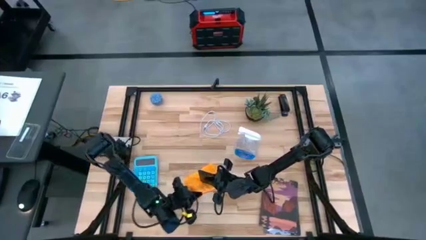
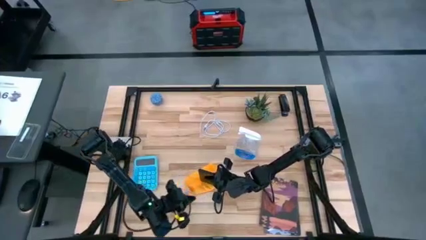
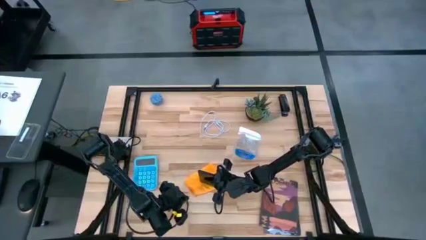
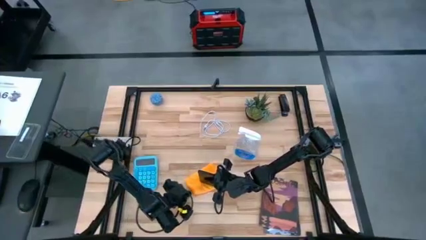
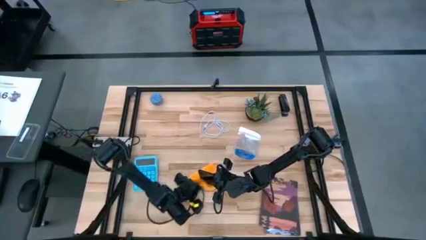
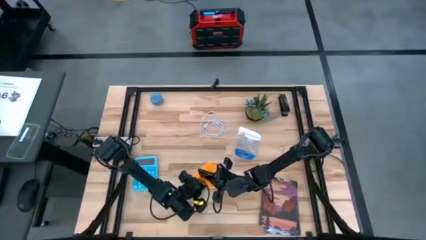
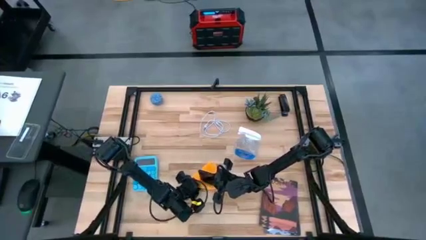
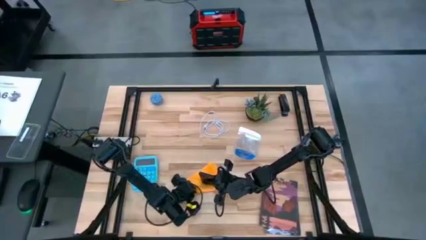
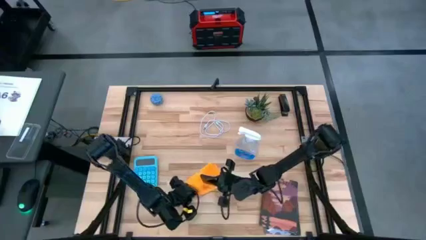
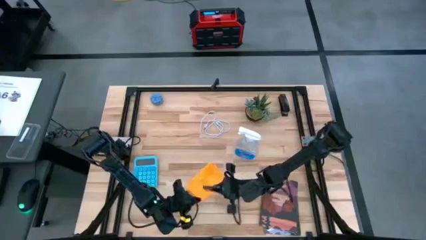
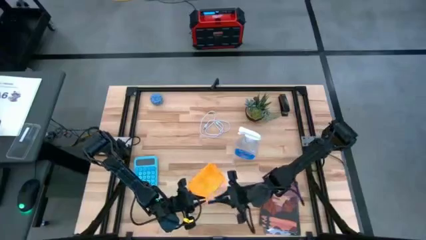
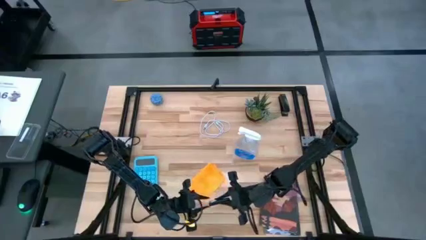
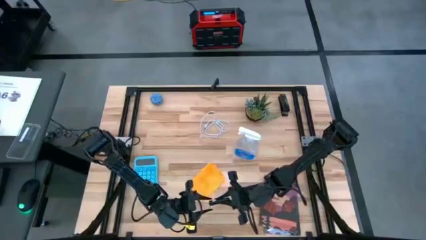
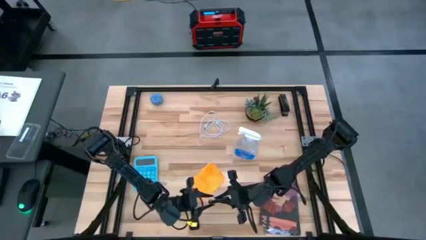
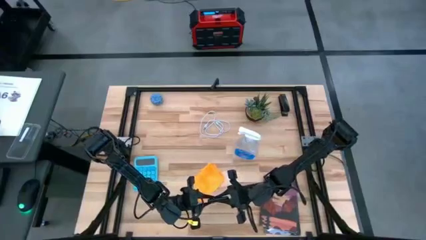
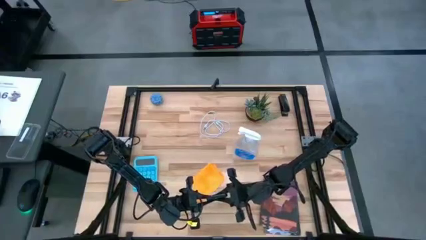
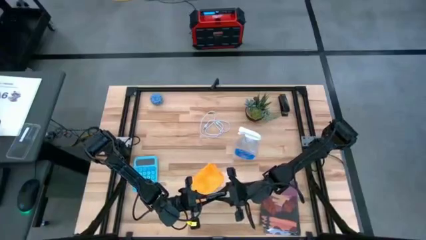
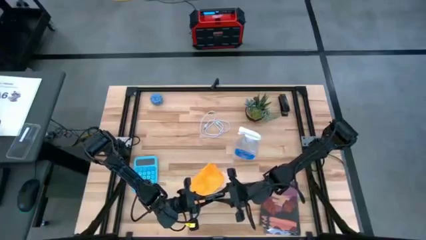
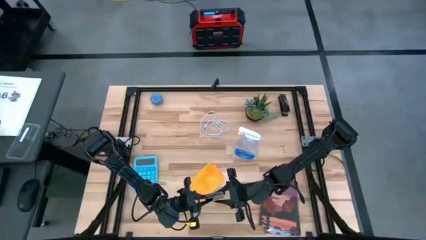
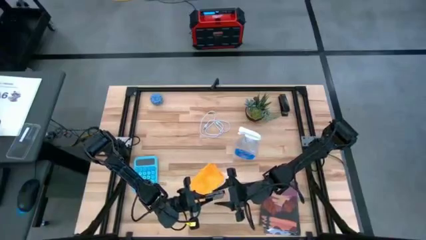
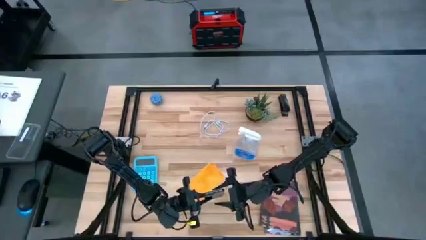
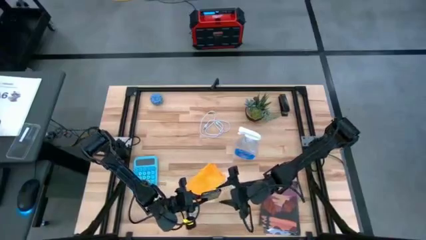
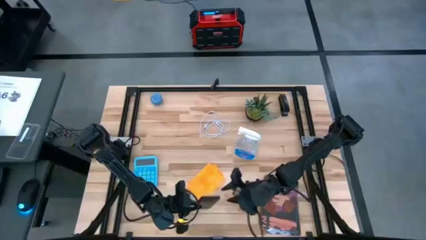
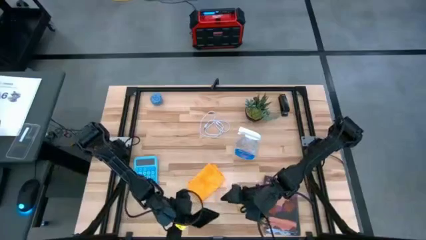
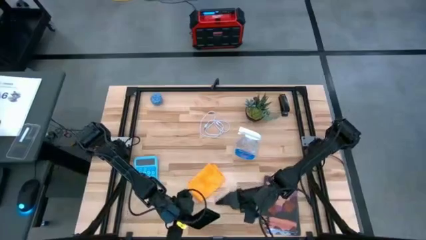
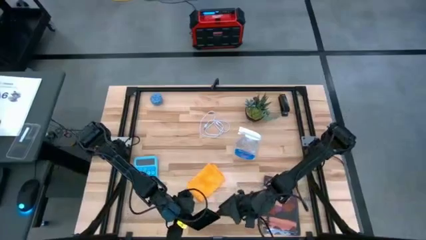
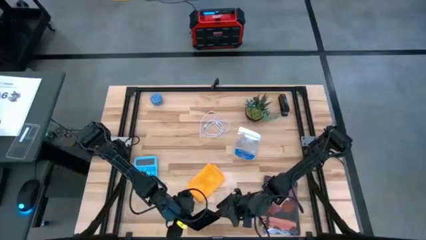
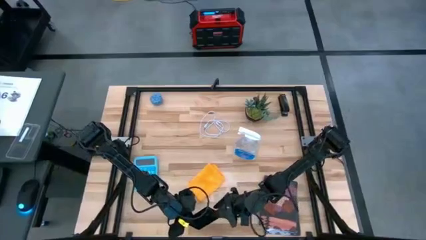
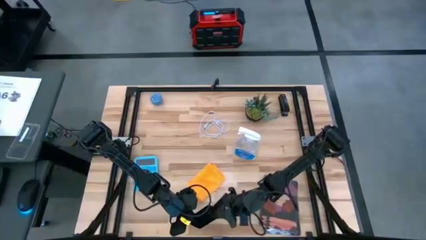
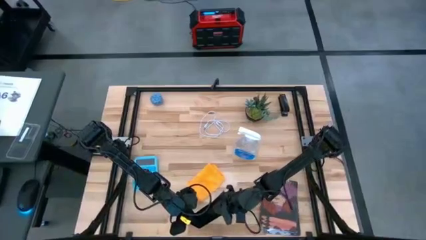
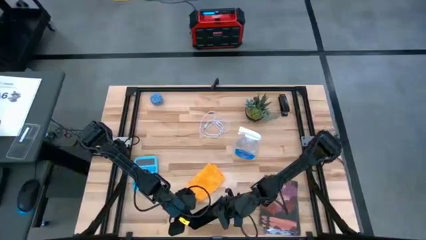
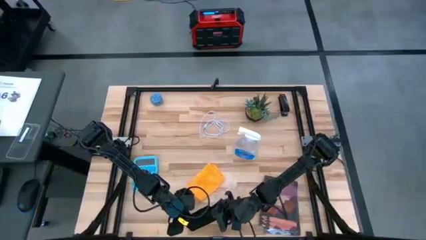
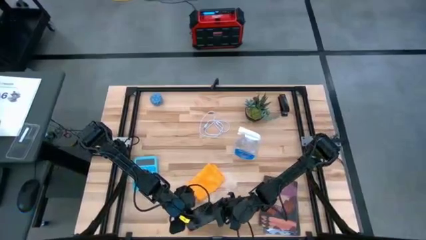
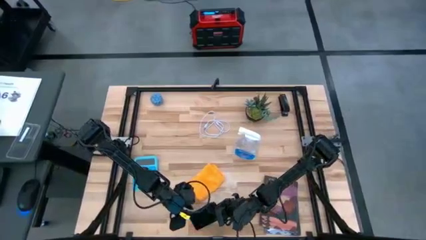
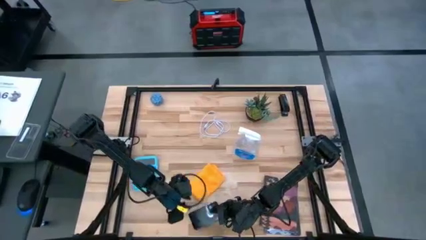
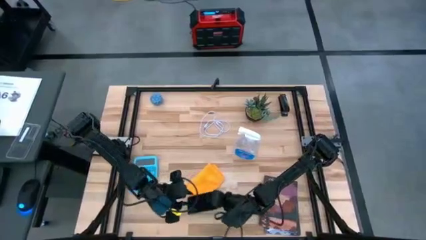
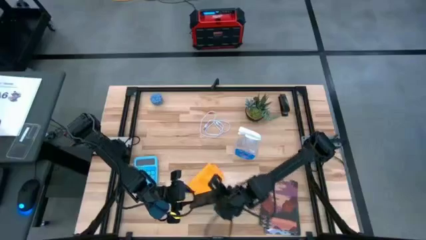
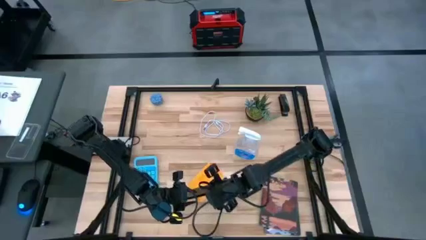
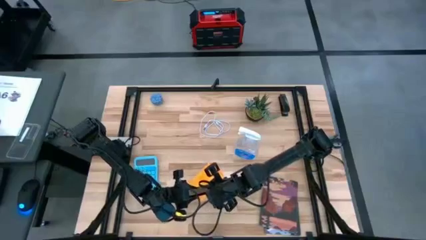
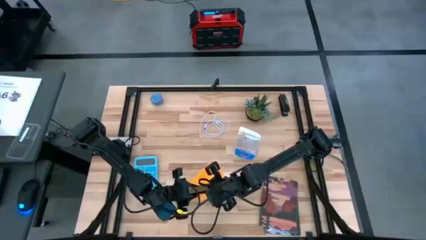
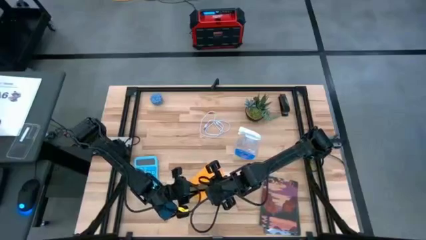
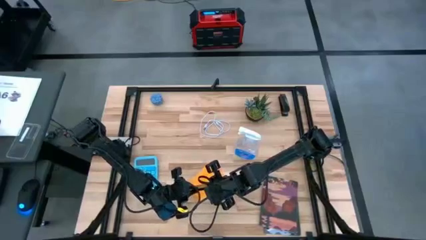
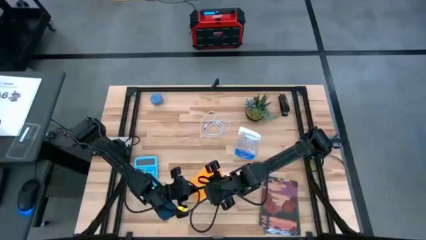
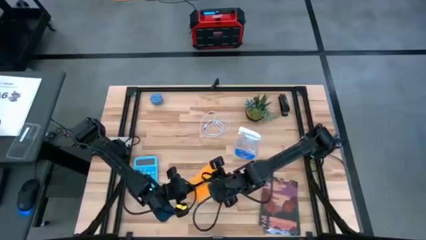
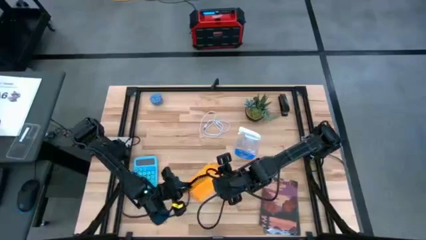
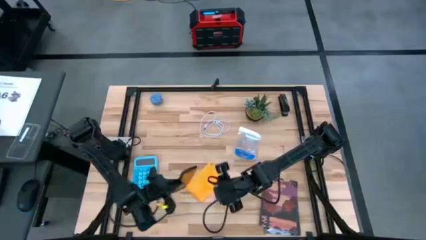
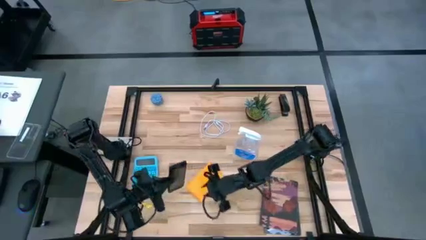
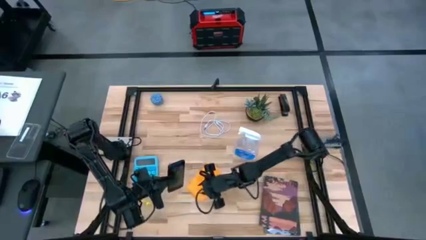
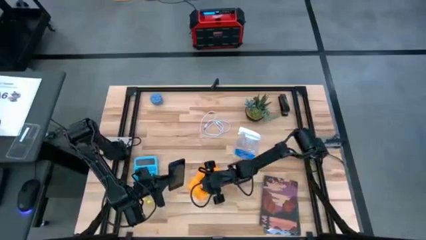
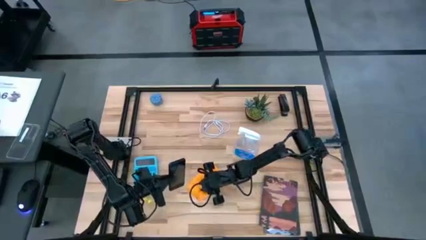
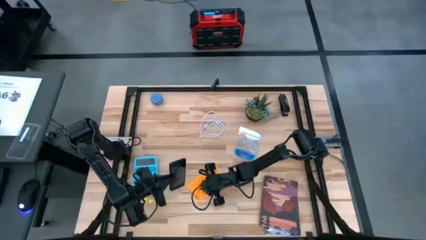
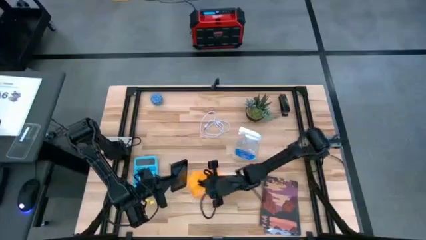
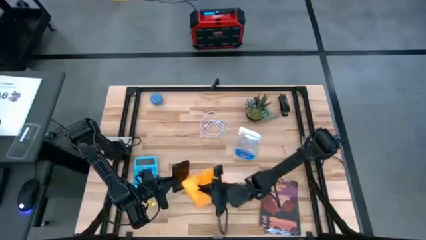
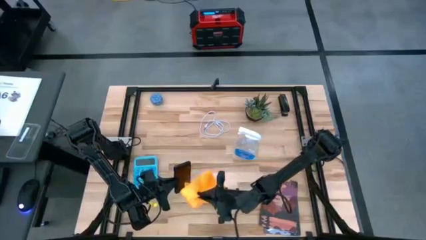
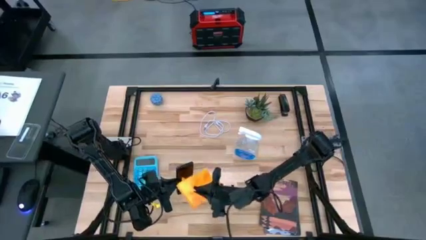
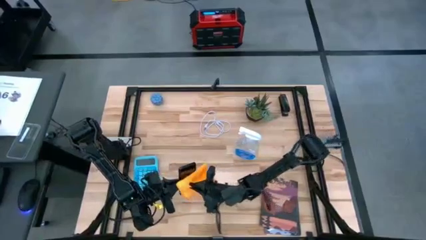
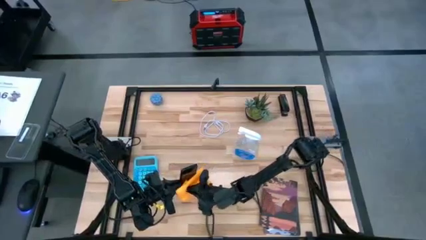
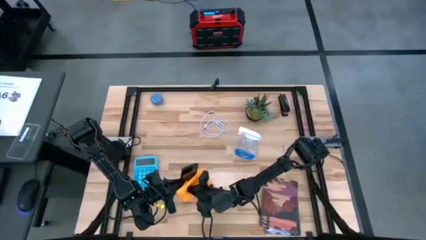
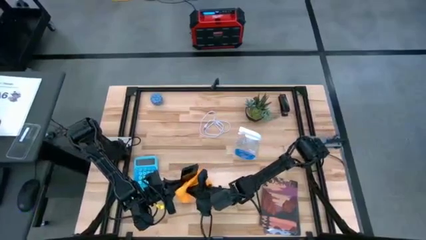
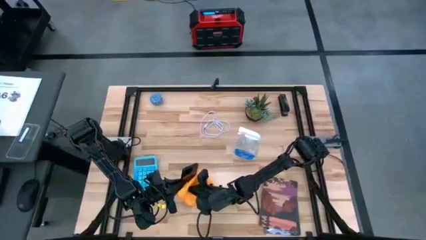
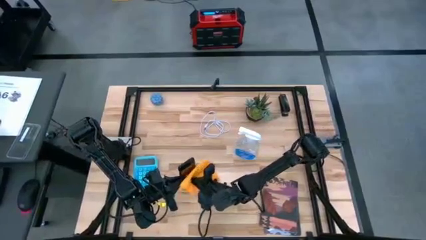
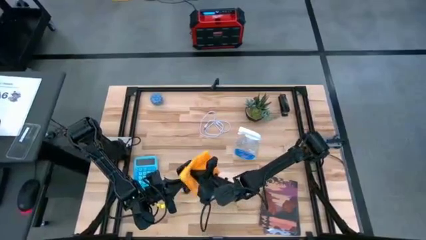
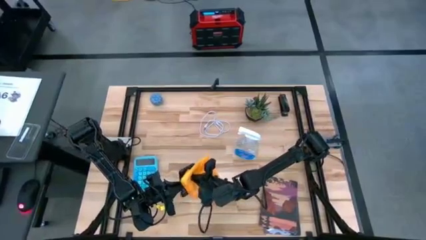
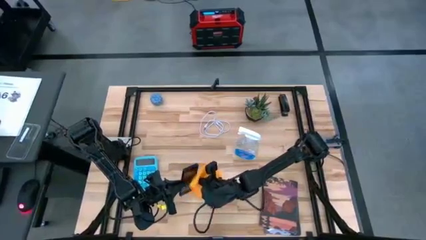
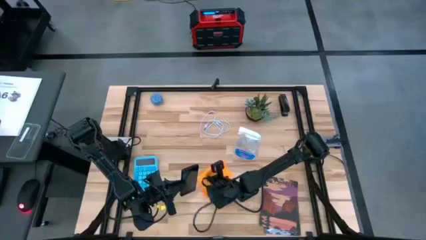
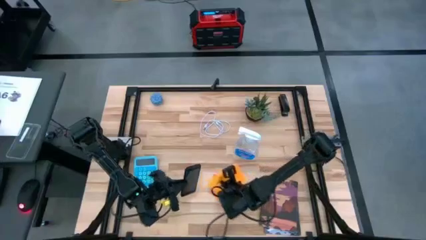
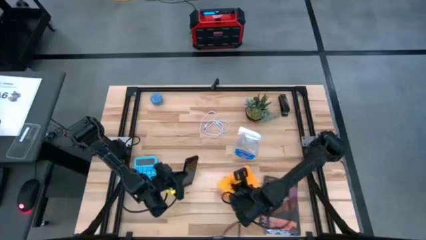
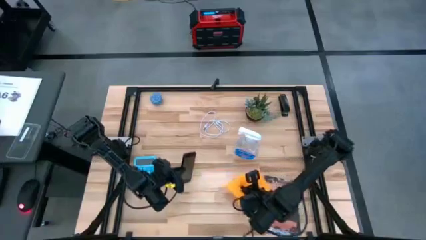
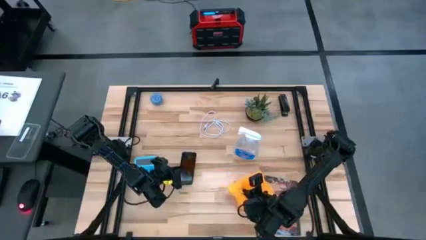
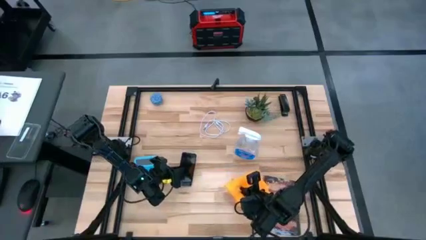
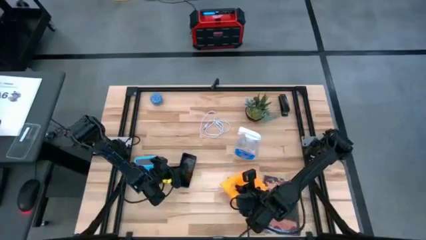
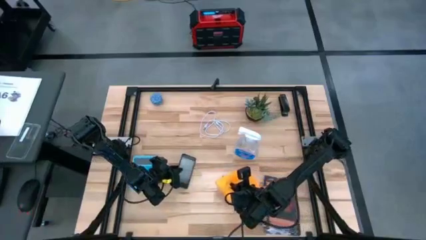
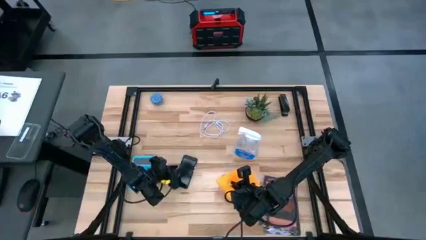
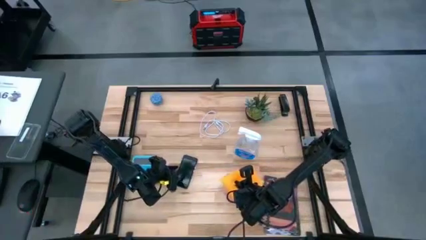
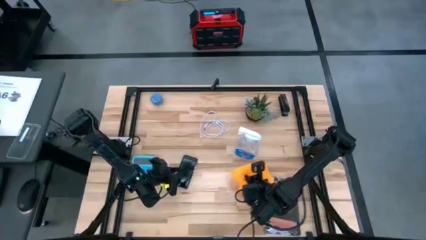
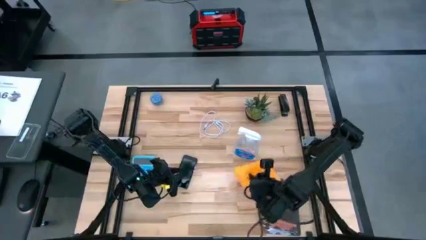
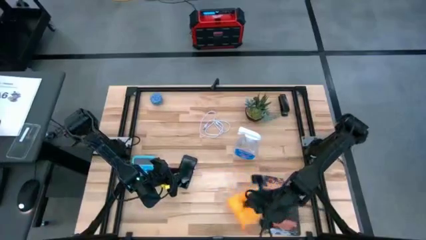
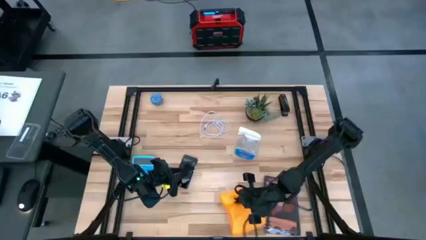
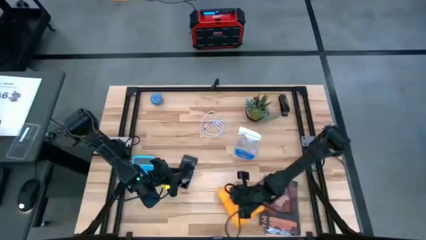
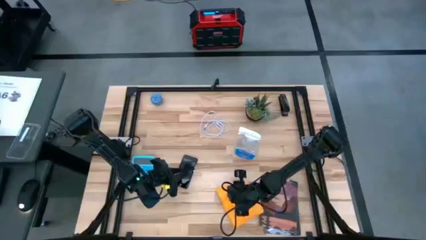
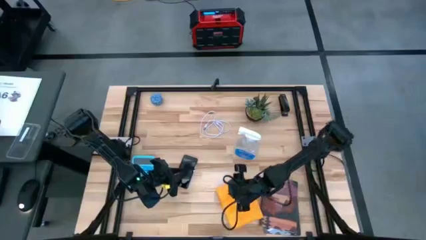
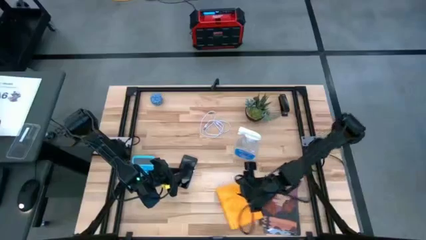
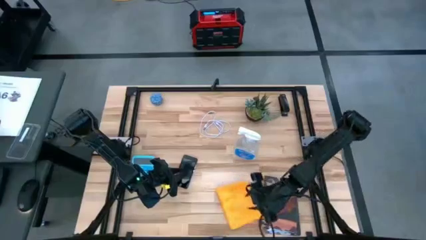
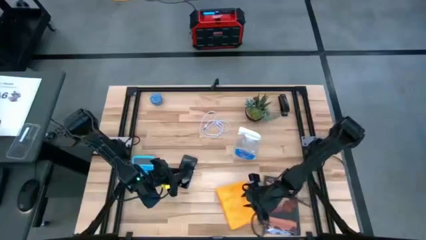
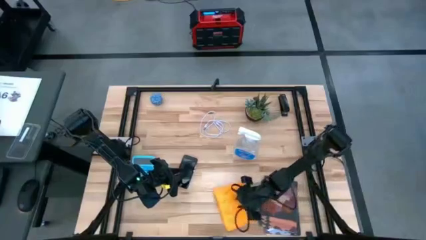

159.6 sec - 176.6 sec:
Task: Apply microfiber cloth
Wipe the black cellphone using microfiber cloth

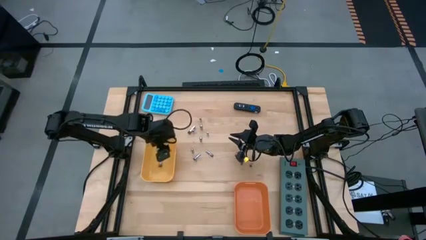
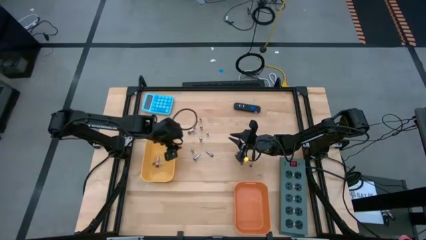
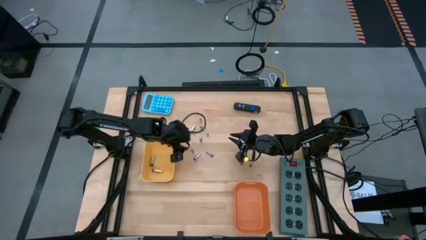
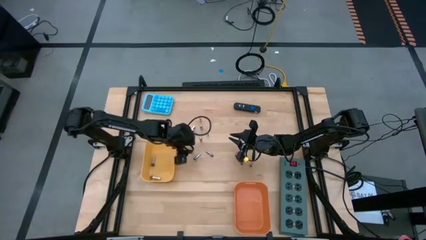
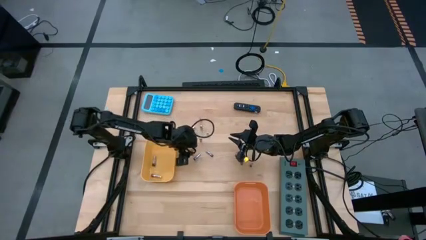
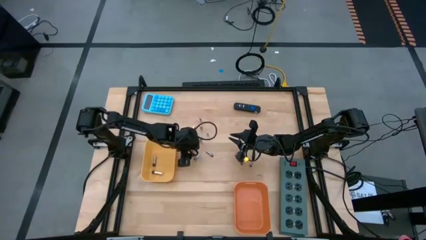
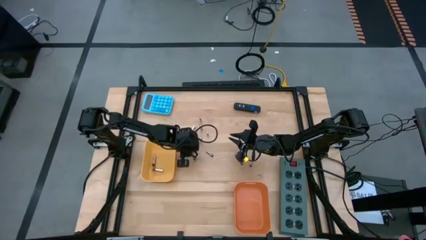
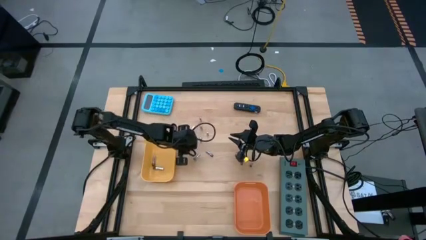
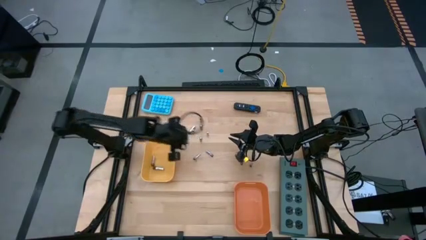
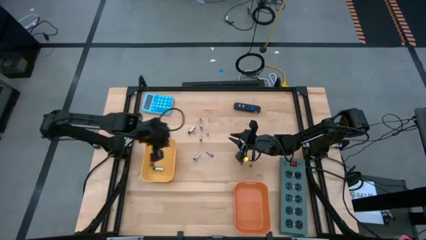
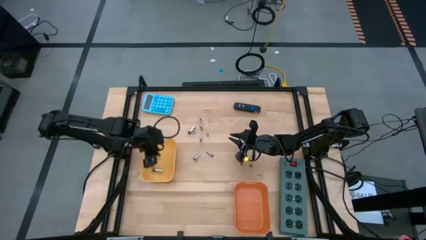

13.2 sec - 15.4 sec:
Task: Sort batteries
Put the silver battery into the yellow bin
